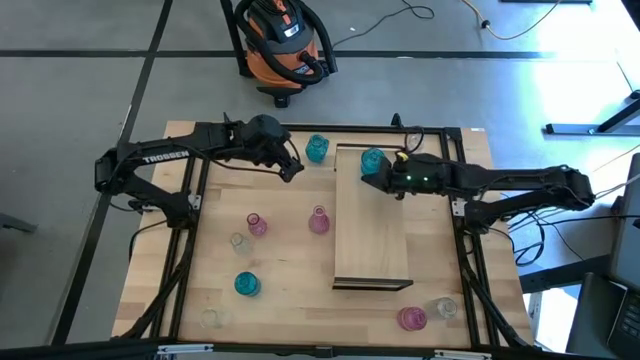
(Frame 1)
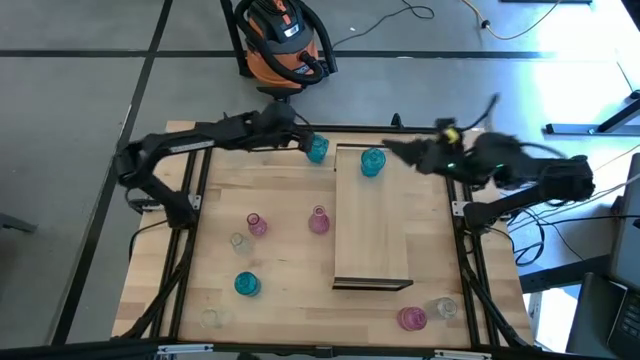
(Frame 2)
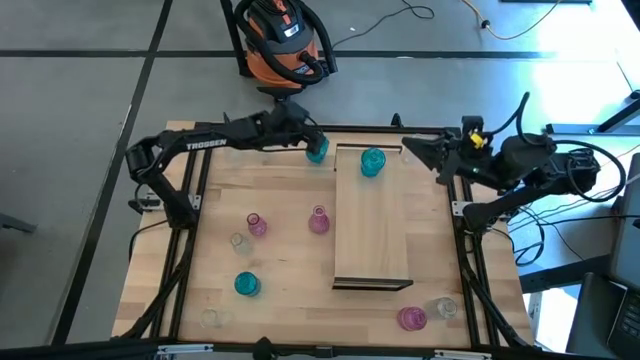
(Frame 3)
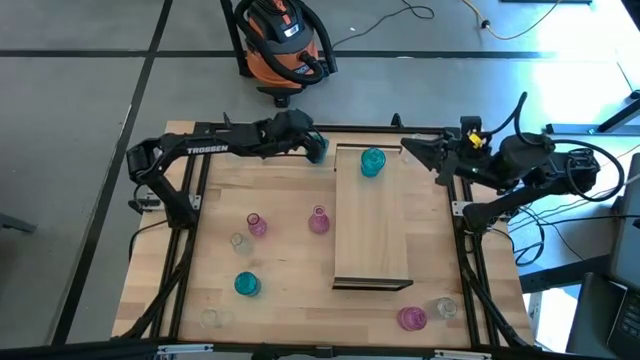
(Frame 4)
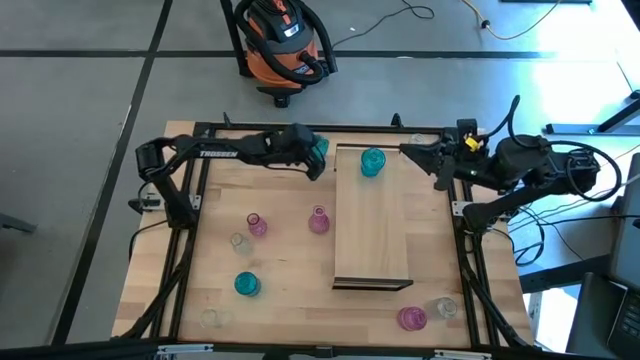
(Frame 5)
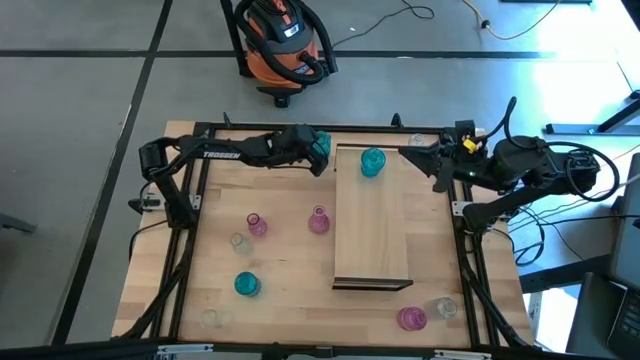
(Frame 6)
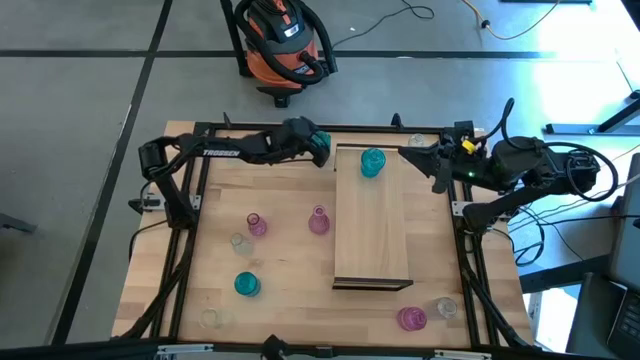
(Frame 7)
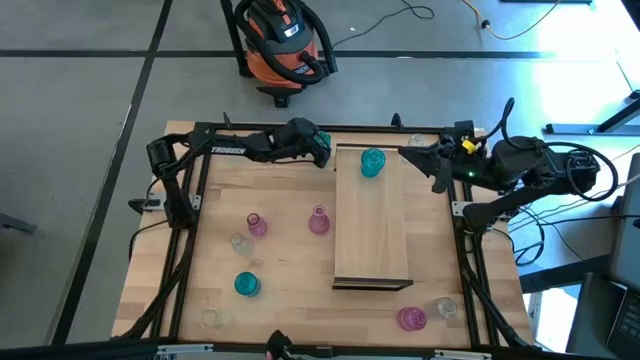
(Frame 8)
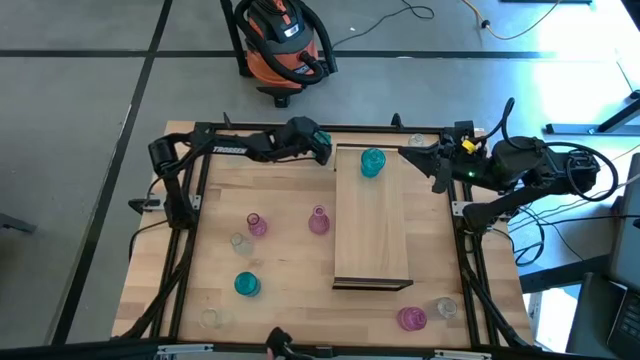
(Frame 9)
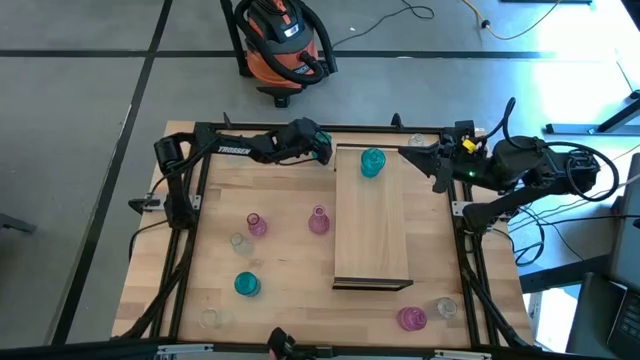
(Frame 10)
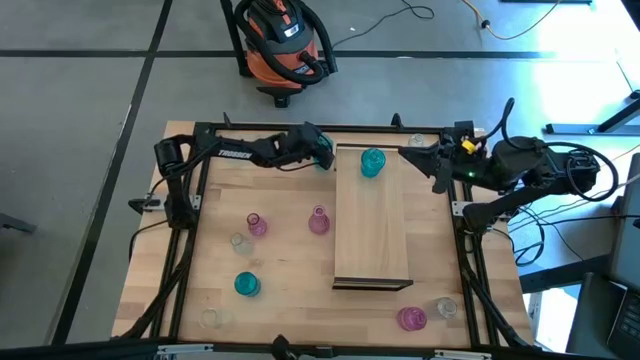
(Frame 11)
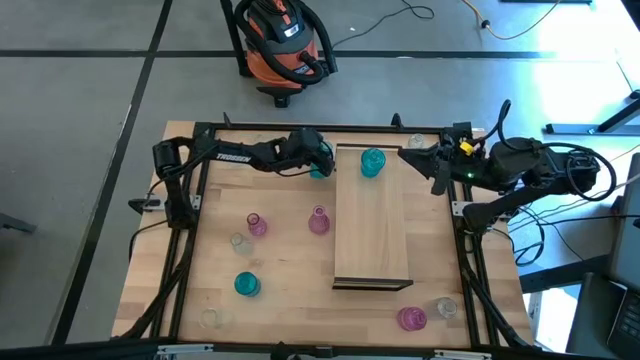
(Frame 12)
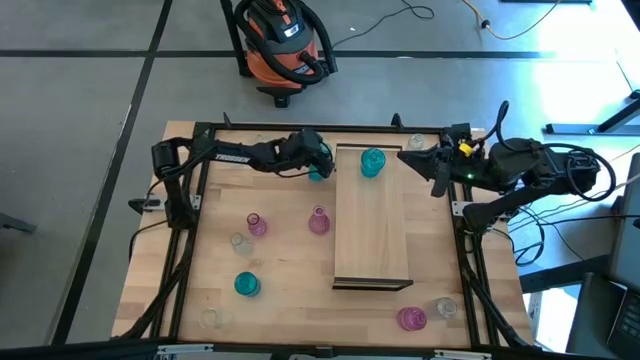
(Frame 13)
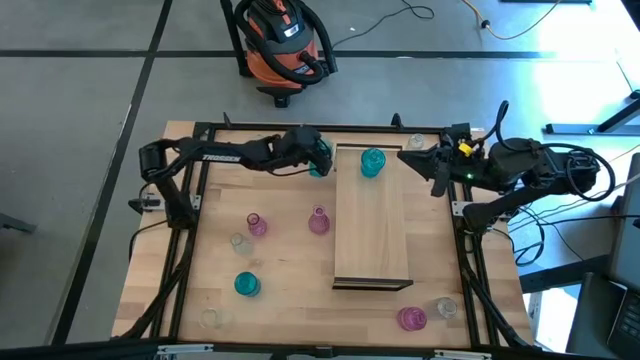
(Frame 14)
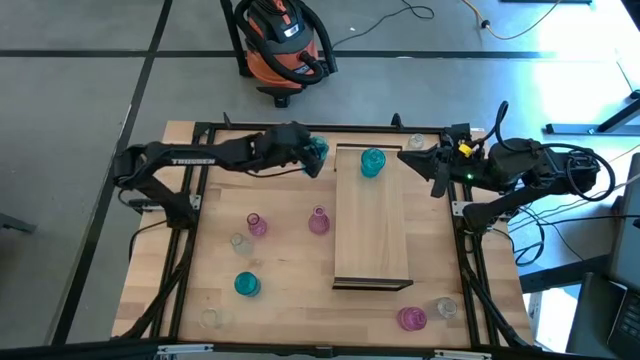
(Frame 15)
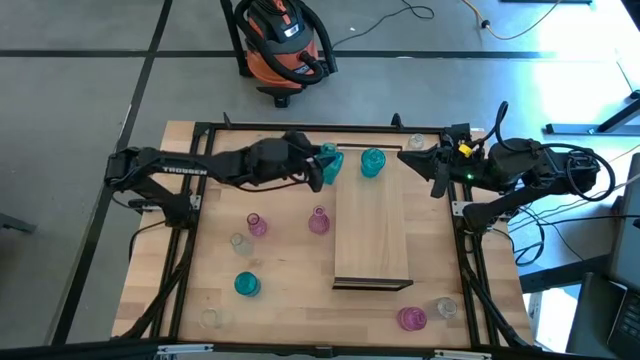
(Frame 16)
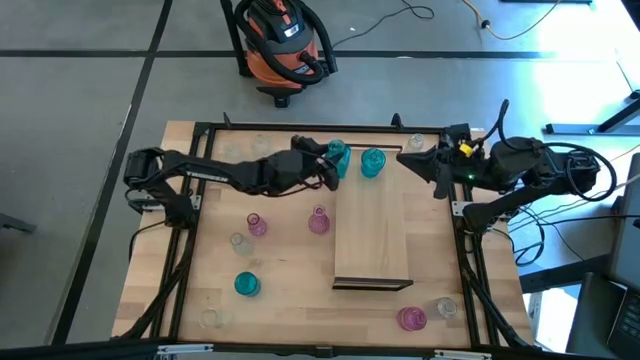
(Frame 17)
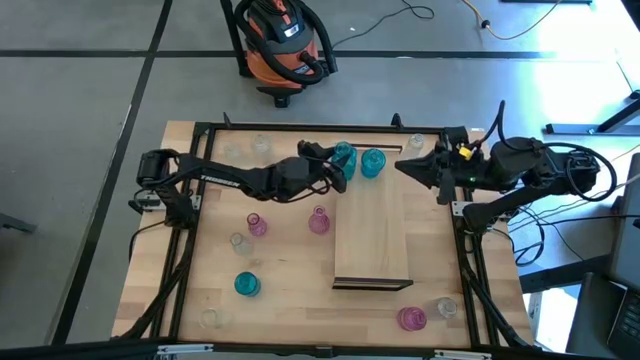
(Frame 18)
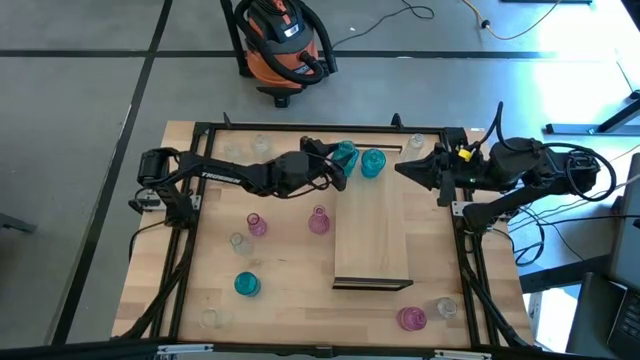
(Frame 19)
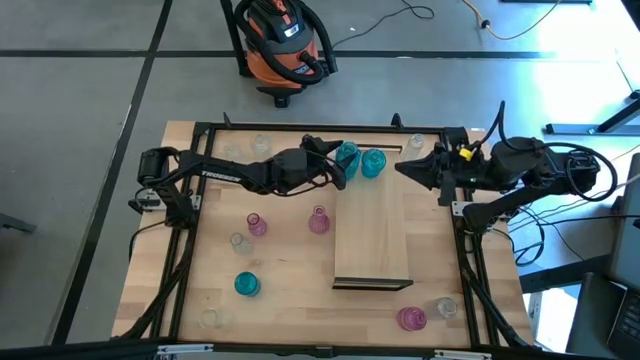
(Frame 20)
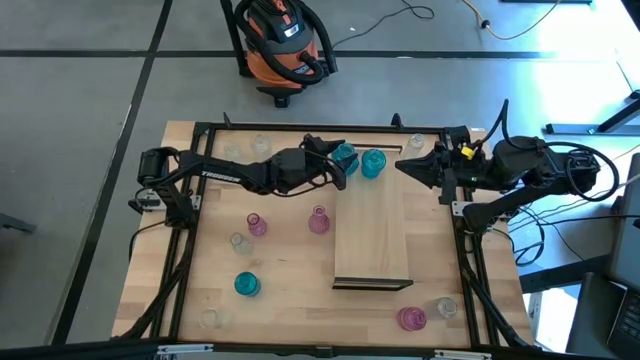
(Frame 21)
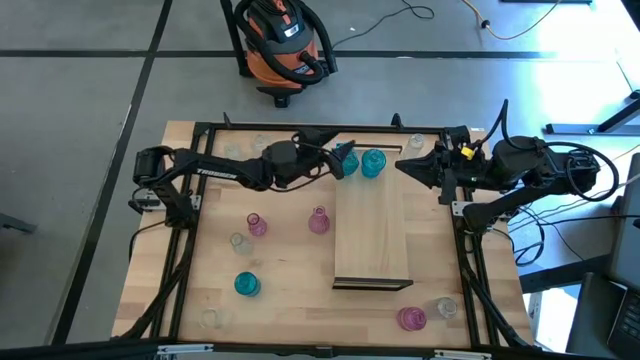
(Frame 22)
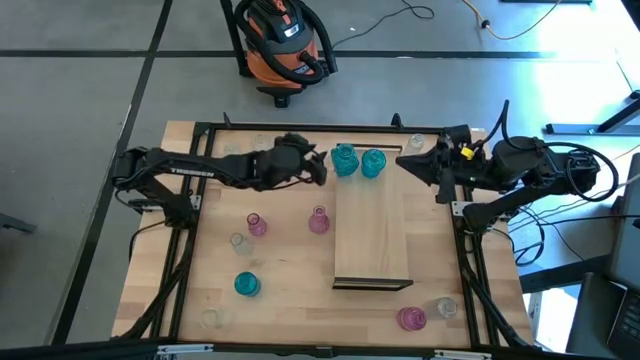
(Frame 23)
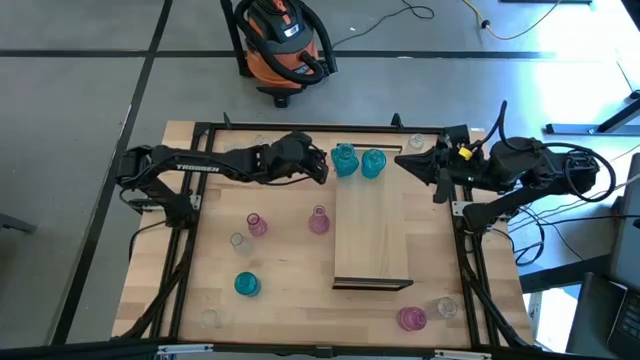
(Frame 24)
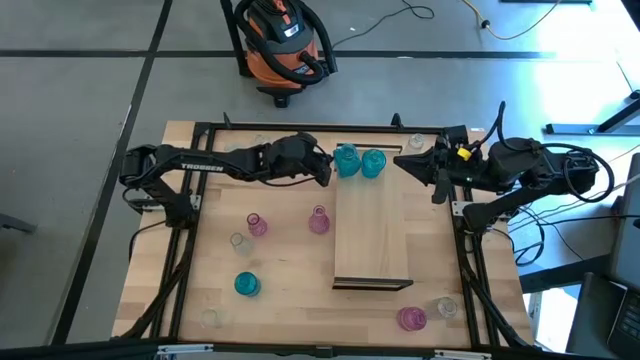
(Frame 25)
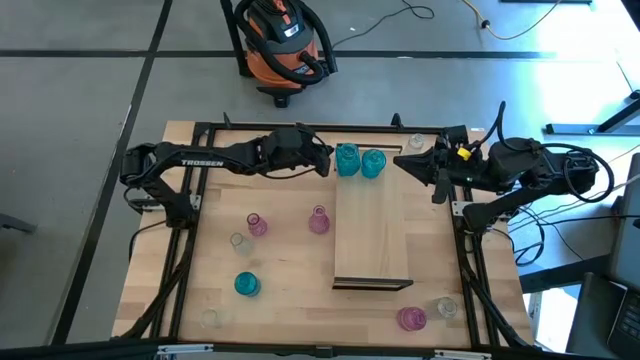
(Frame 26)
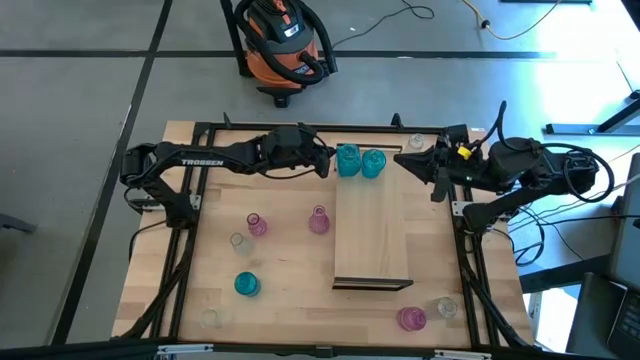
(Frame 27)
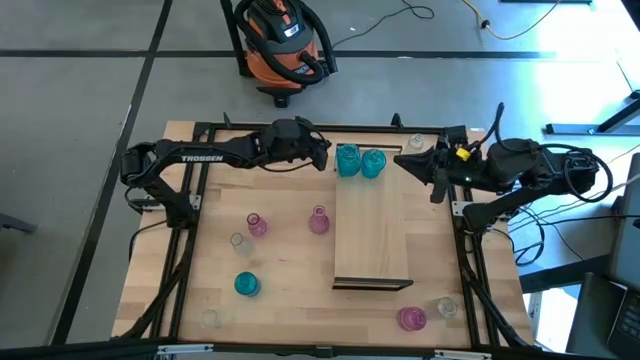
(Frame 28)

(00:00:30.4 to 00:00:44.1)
Task: sort vases onto shelf
Put the blue vase on the shelf aligned with the other blue vase

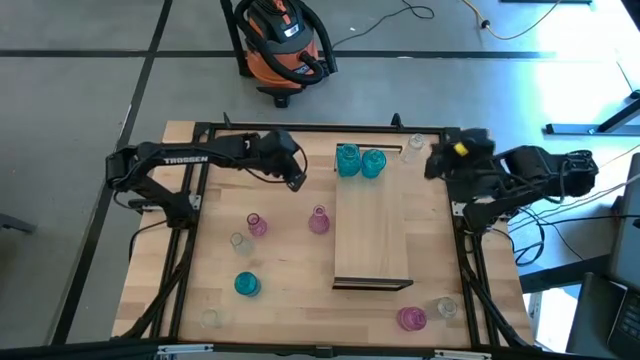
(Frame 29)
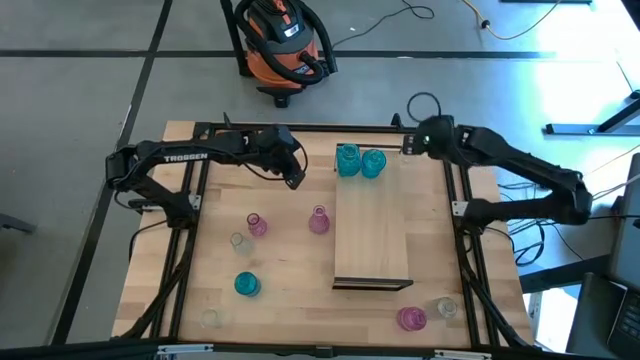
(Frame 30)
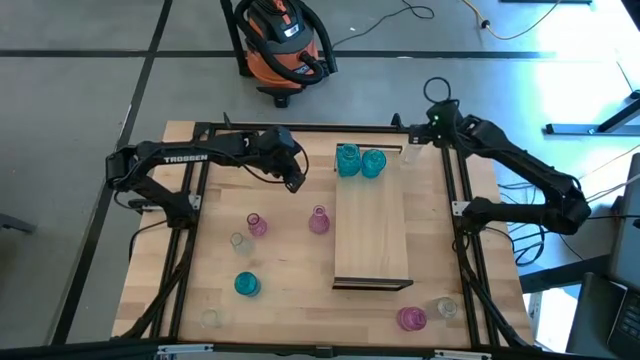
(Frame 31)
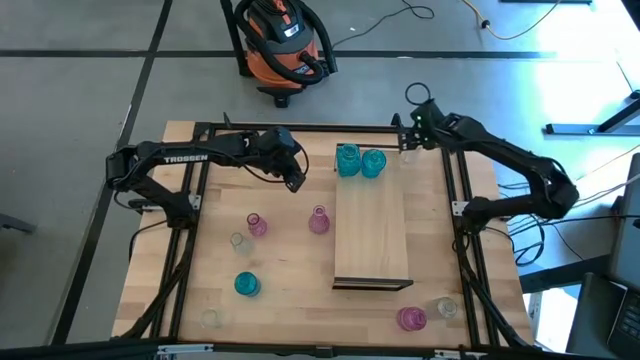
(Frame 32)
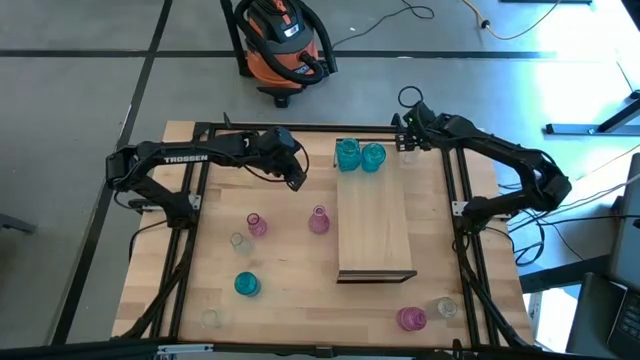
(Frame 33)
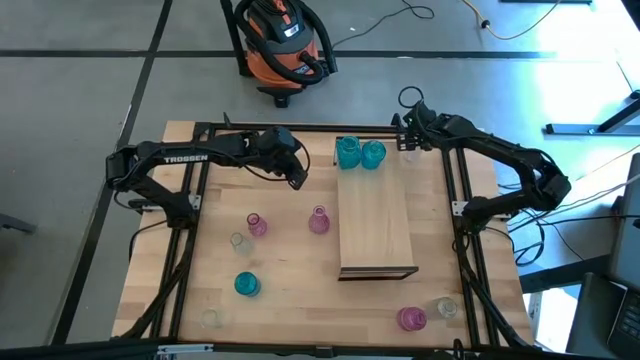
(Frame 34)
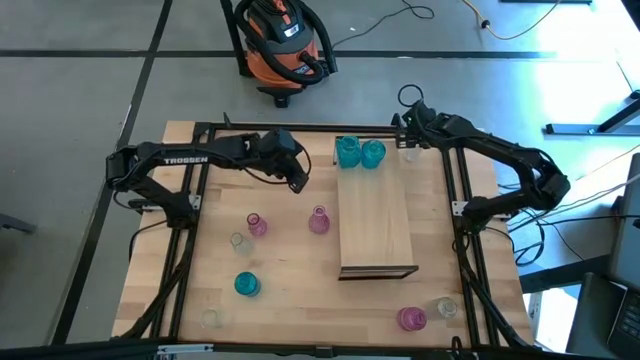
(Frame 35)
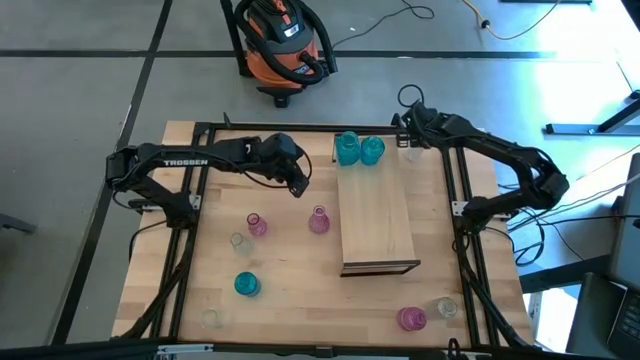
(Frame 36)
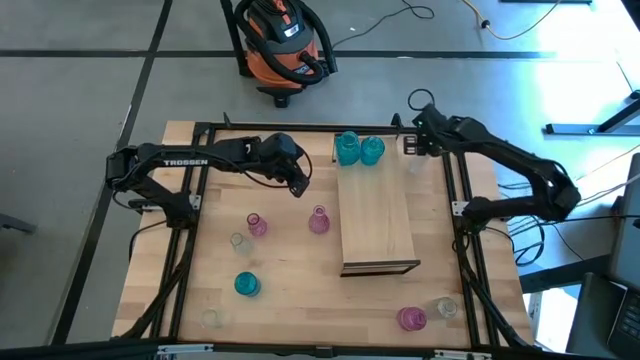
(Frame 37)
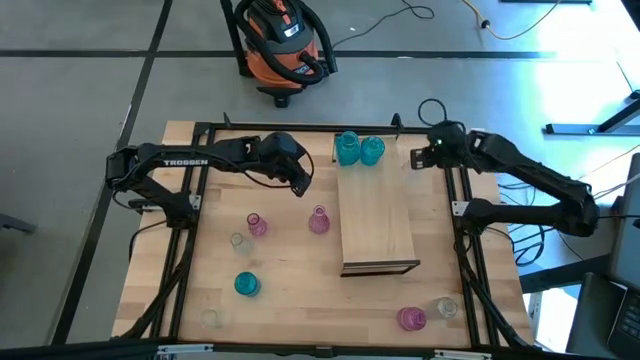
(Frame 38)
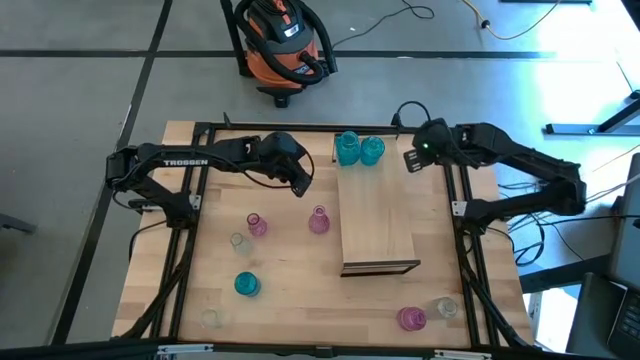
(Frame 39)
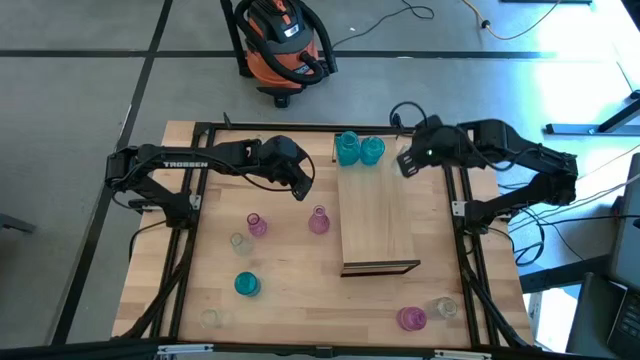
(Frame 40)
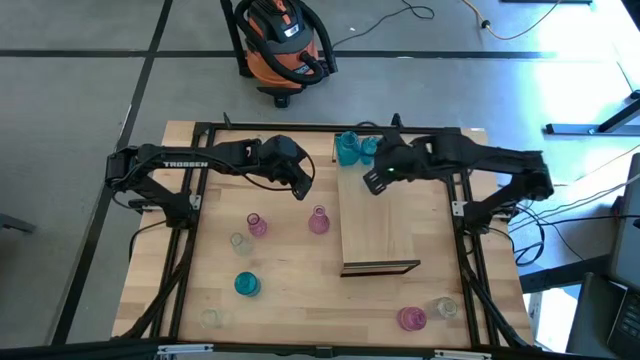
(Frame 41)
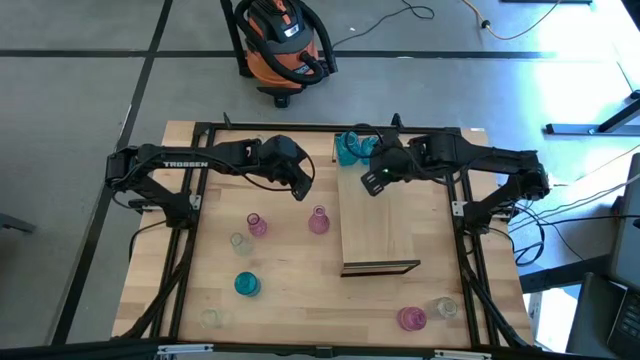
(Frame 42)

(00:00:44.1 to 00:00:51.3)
Put the transparent vase on the shelf
